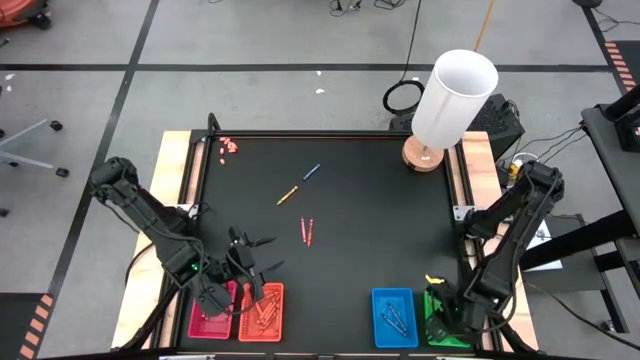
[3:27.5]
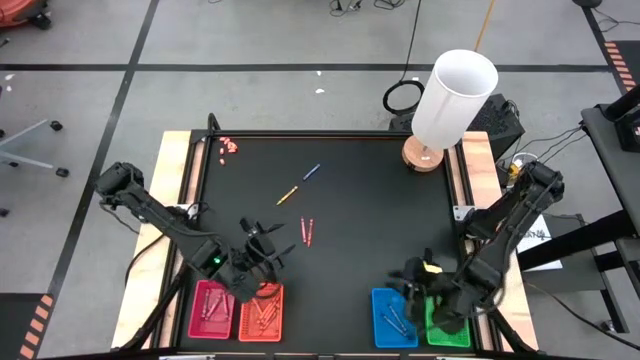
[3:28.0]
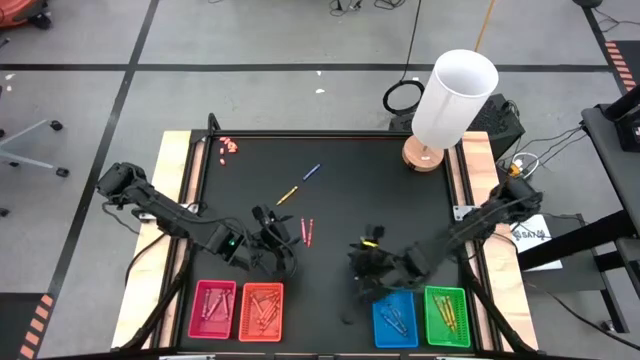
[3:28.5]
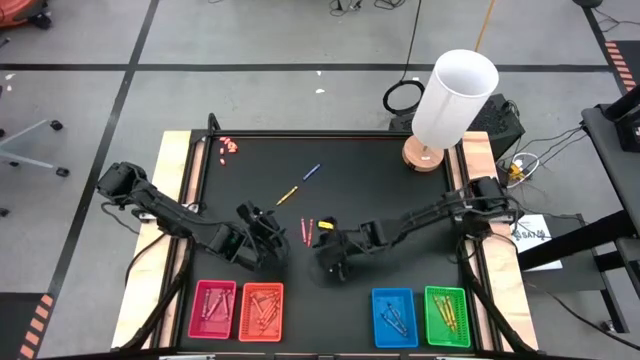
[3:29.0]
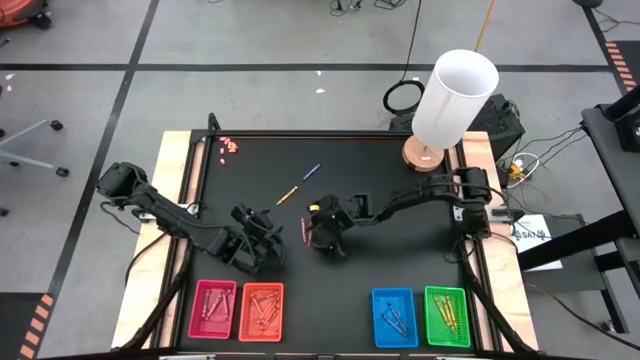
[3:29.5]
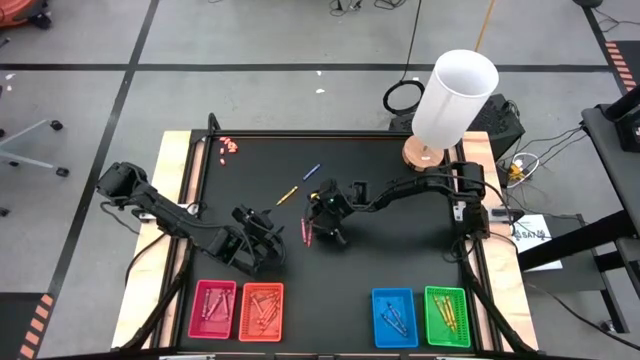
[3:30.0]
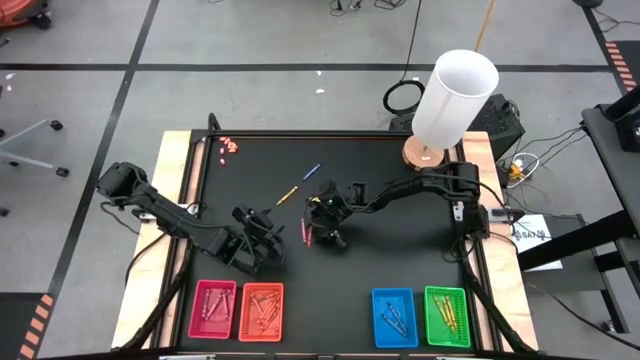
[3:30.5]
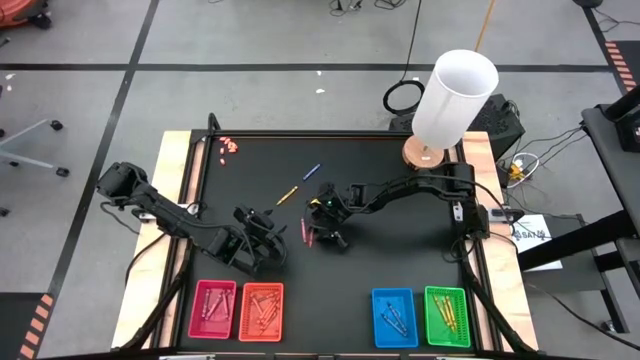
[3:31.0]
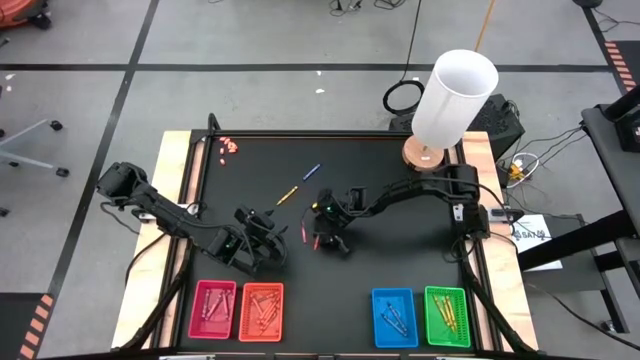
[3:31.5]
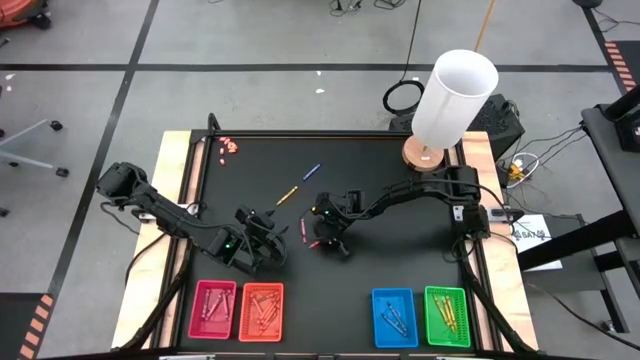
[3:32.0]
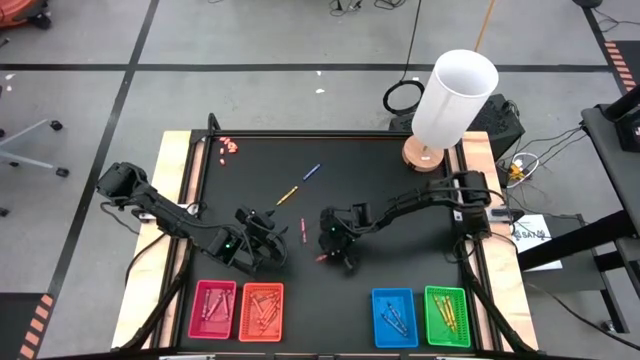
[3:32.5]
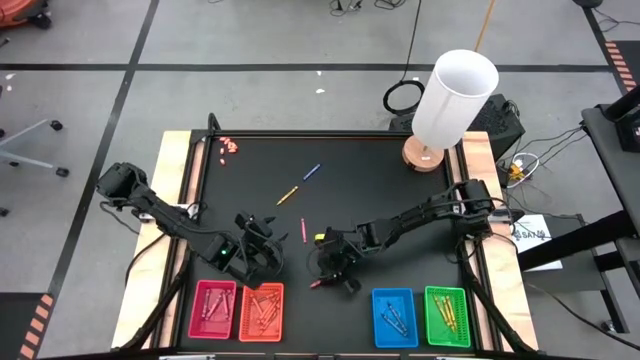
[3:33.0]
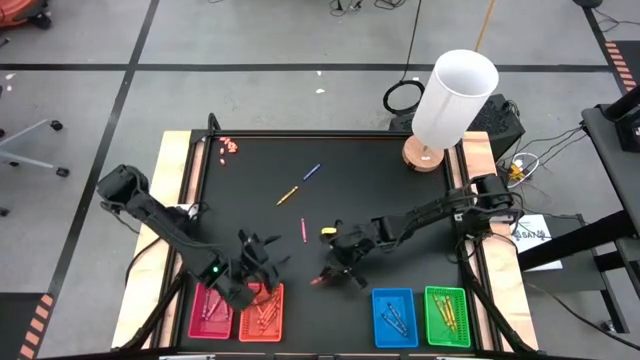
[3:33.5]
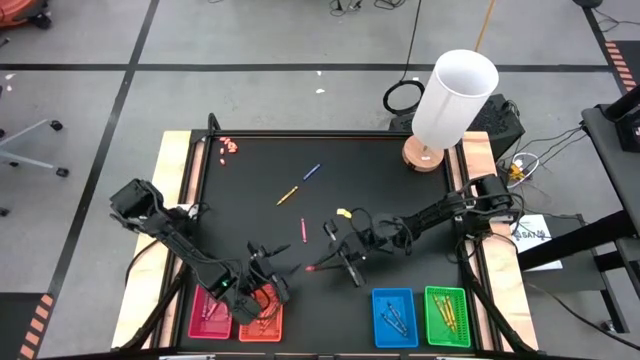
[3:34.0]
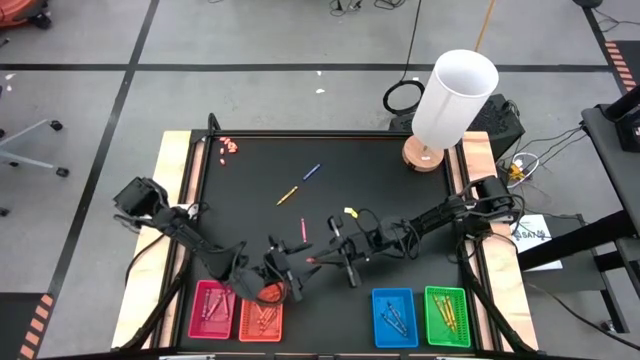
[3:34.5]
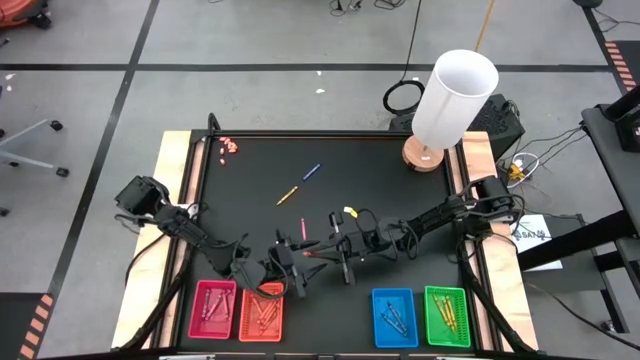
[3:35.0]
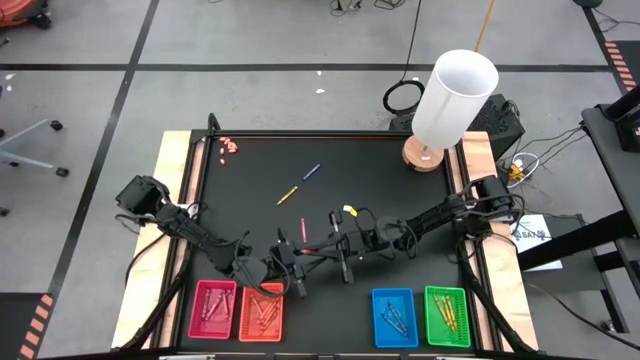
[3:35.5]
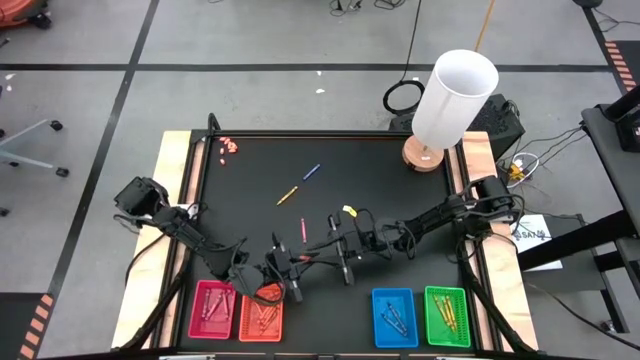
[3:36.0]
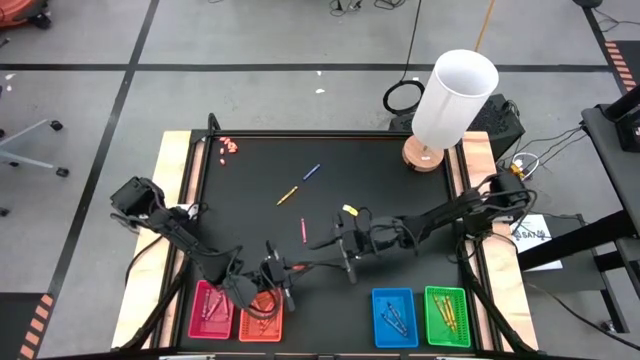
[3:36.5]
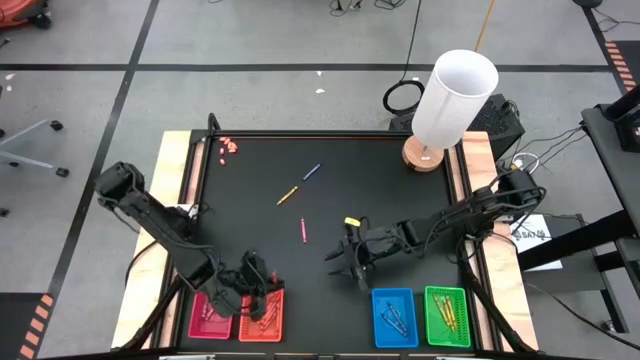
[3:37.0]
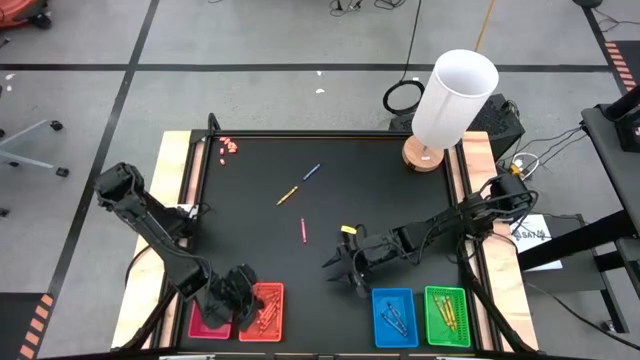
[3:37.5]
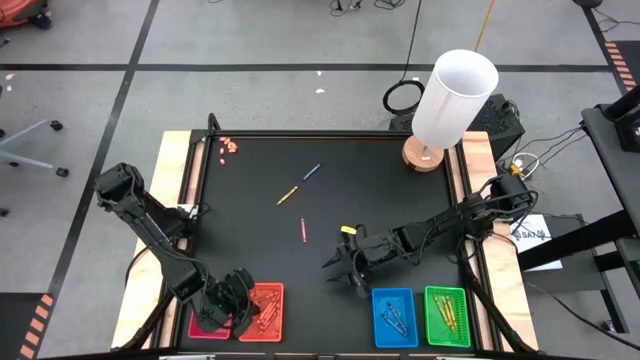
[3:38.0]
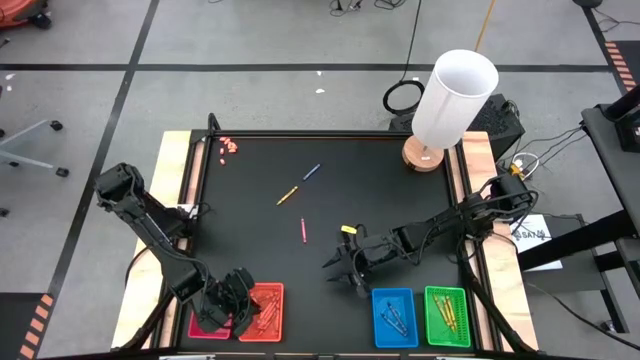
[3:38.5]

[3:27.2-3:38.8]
Task: Sort crayons
Put the orange crayon into the orange bin

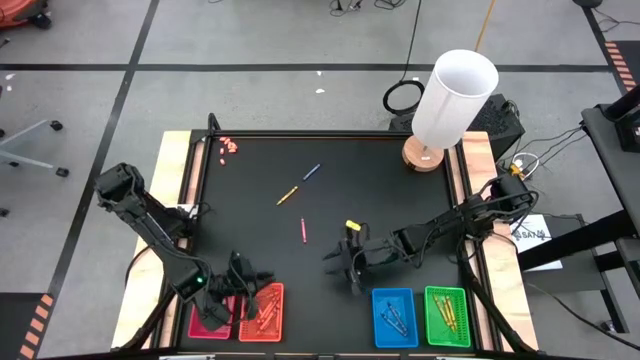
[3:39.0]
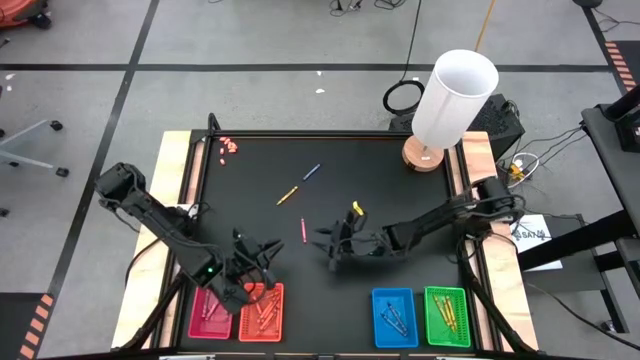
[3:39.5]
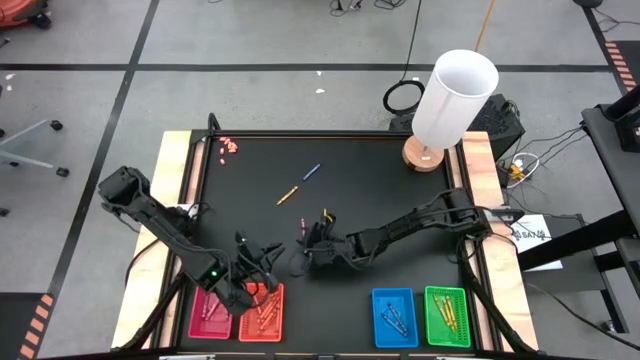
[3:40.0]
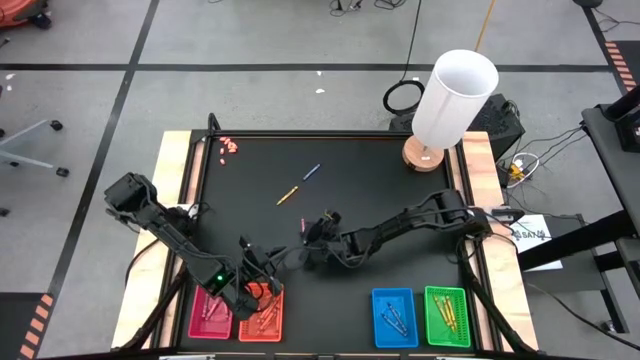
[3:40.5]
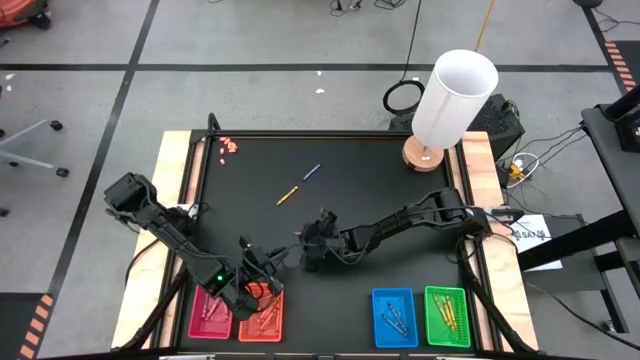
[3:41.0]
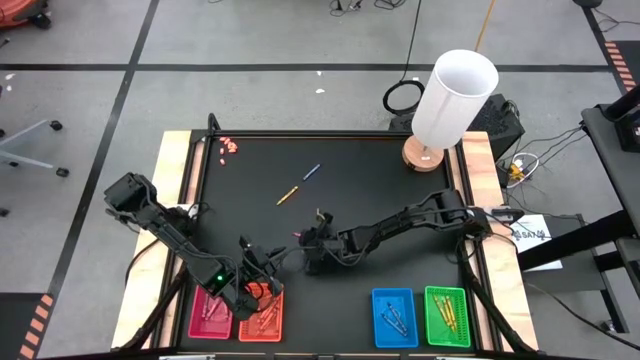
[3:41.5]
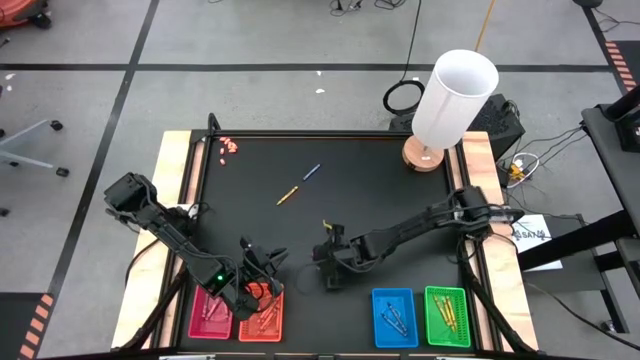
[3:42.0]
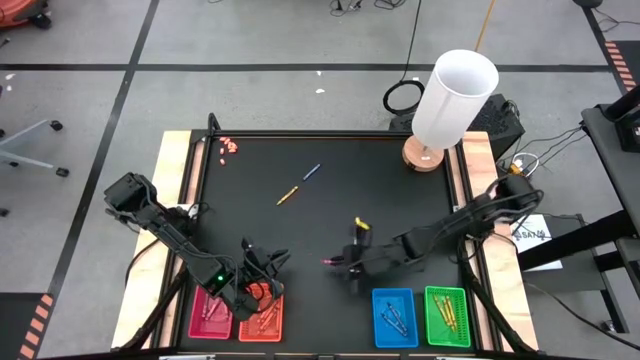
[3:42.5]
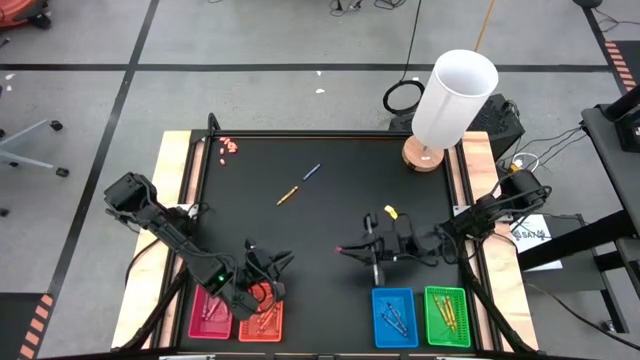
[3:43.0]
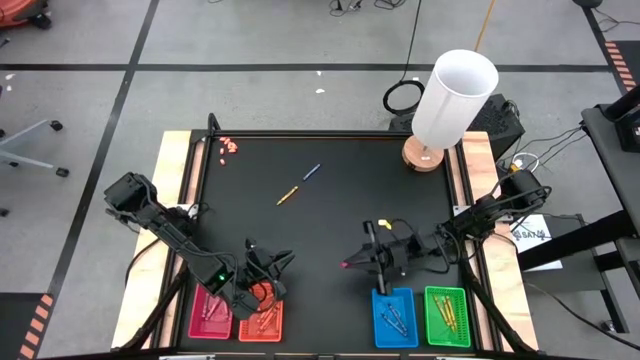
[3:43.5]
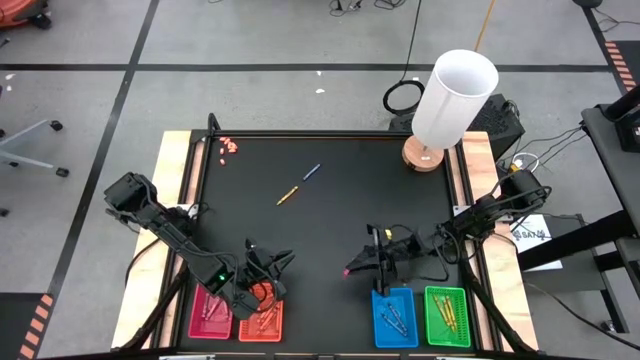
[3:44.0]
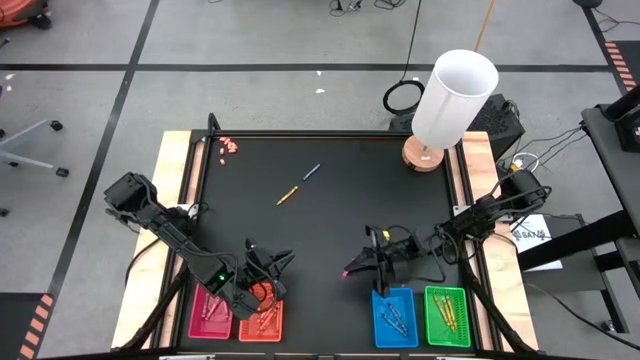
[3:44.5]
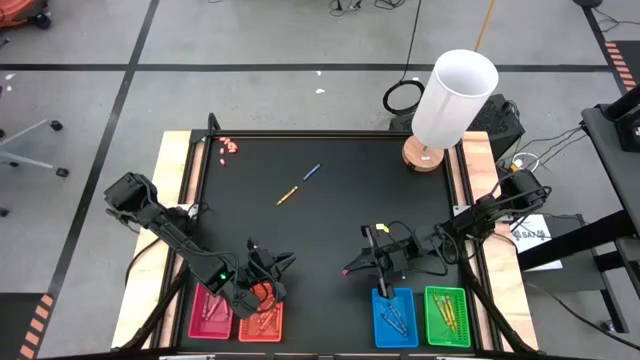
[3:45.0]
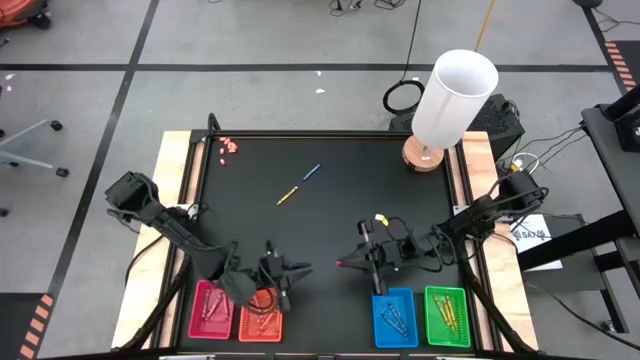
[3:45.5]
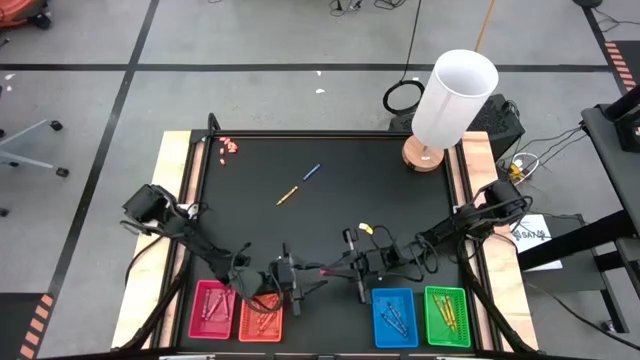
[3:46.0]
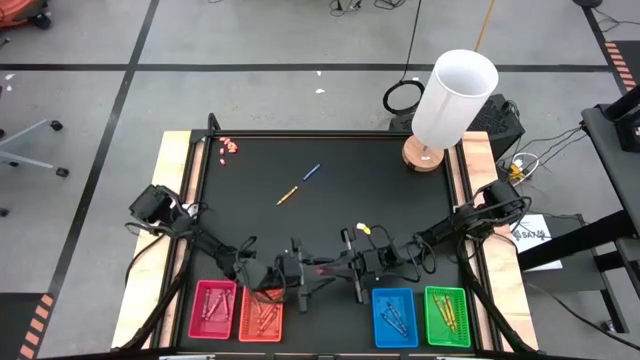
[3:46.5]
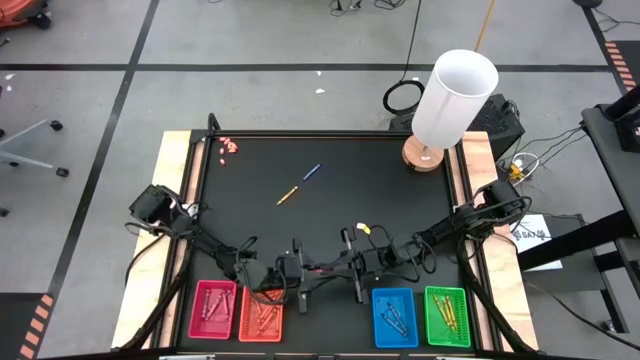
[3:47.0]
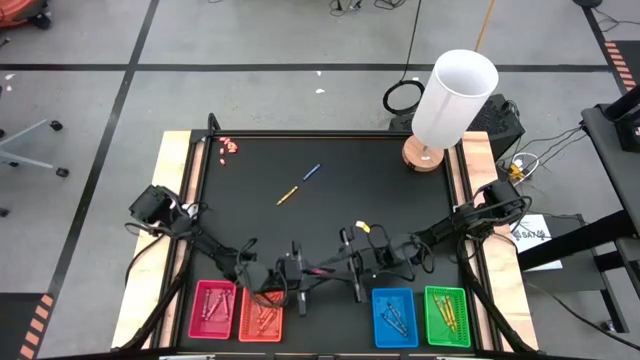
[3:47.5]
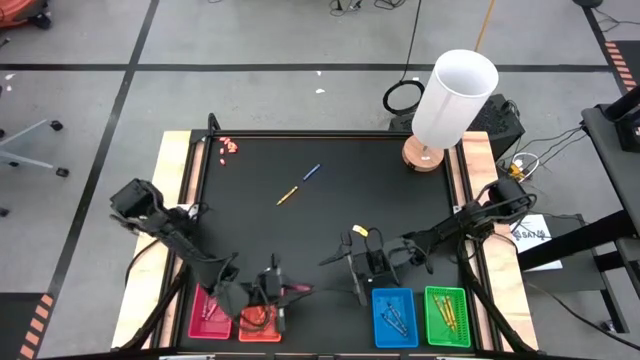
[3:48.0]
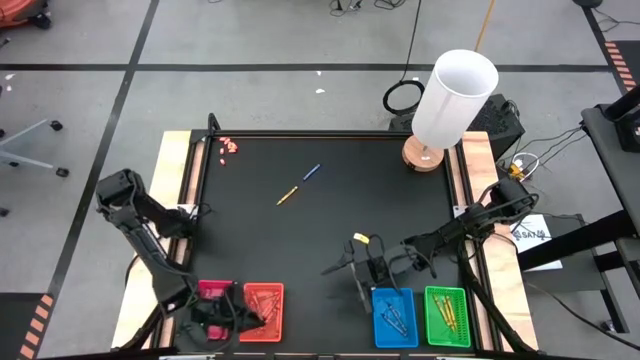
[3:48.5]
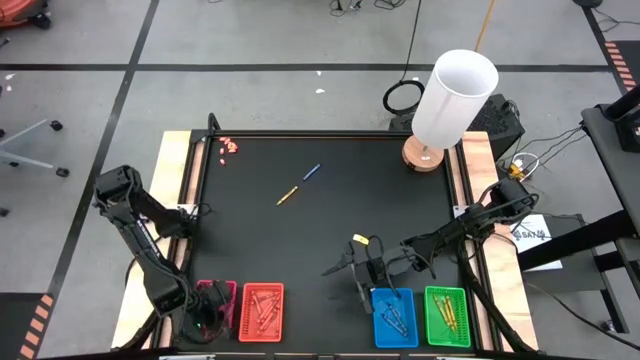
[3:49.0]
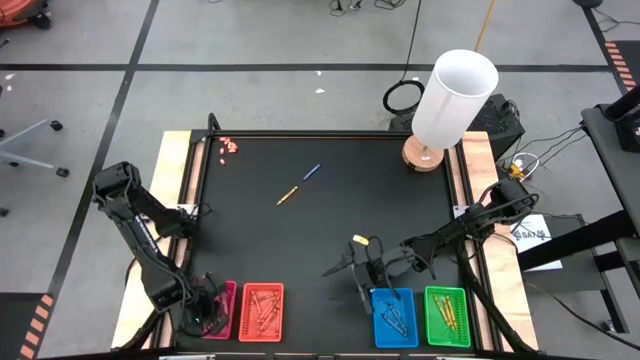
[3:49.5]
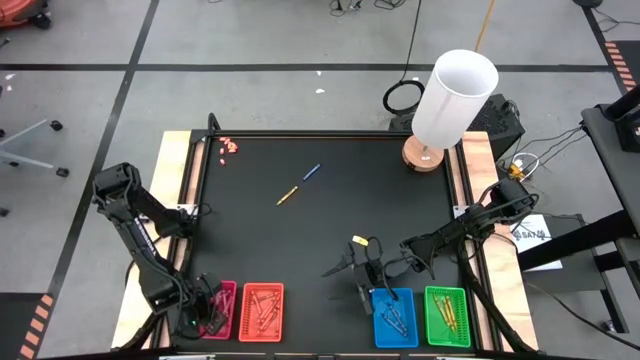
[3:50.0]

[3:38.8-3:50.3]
Put the red crayon into the red bin
